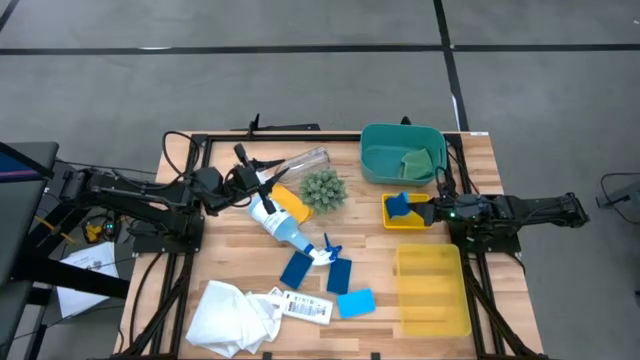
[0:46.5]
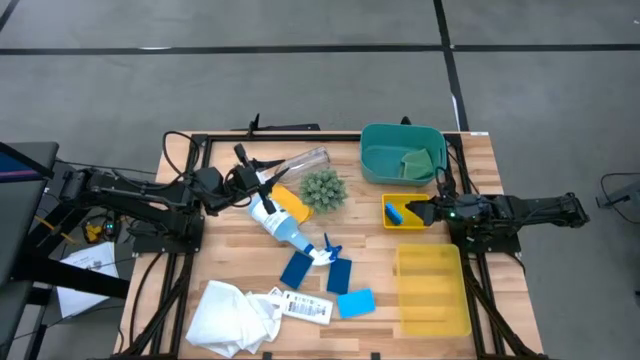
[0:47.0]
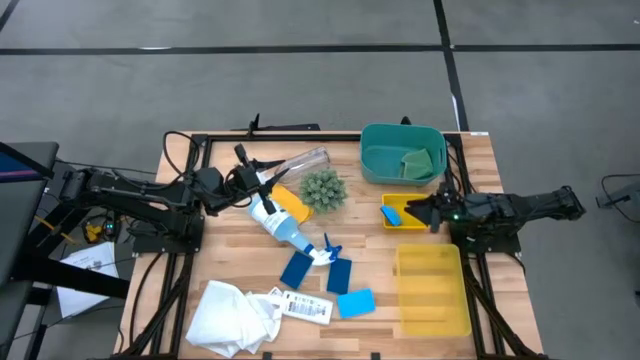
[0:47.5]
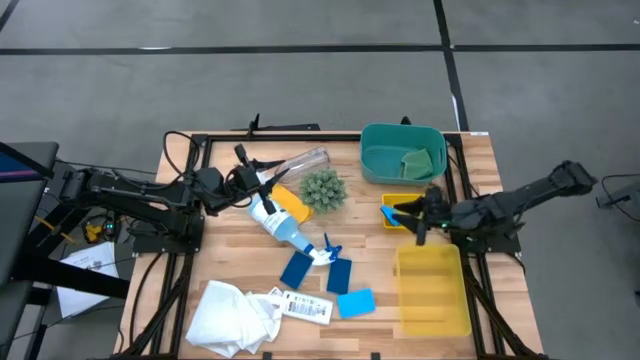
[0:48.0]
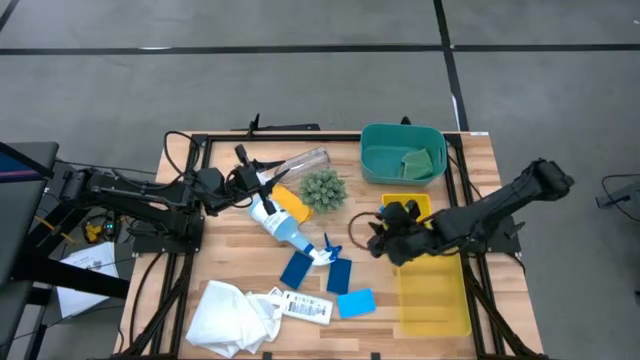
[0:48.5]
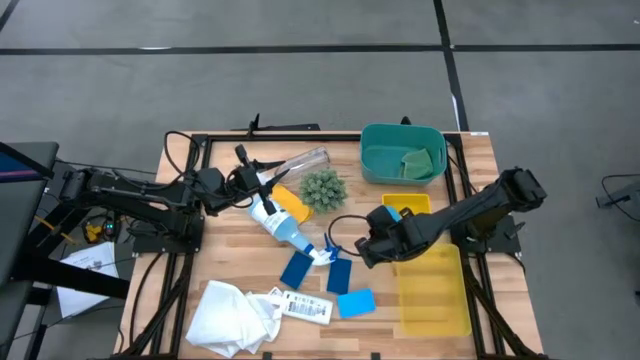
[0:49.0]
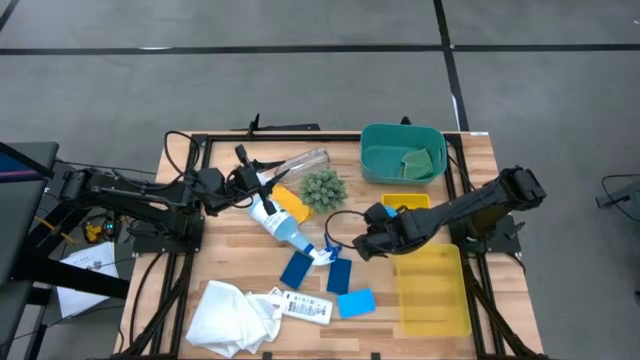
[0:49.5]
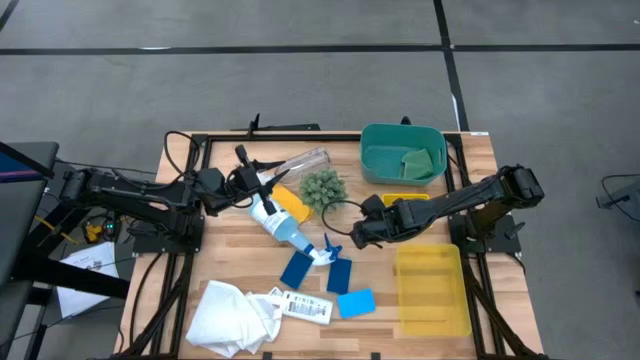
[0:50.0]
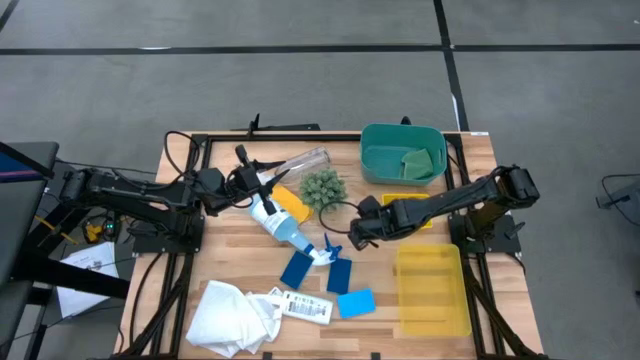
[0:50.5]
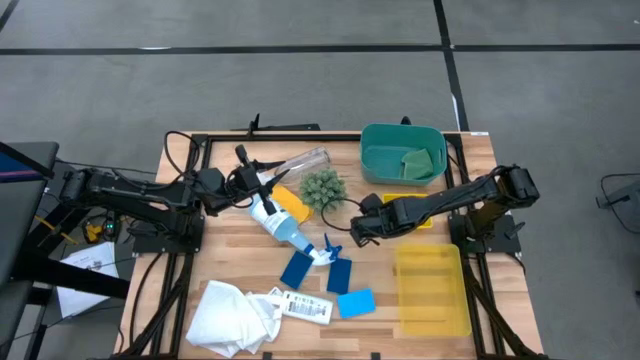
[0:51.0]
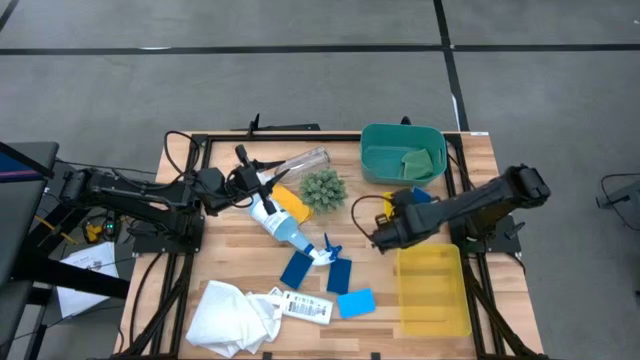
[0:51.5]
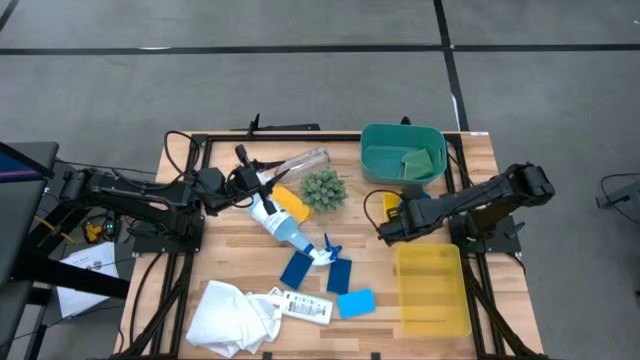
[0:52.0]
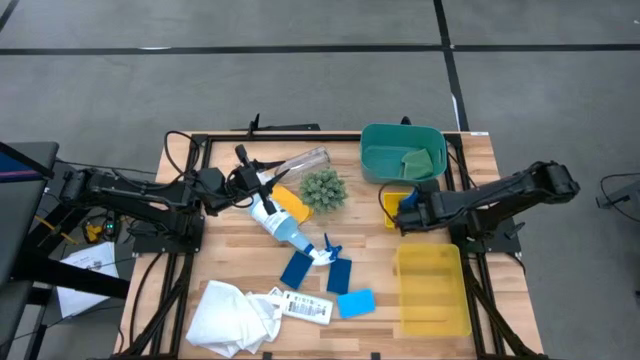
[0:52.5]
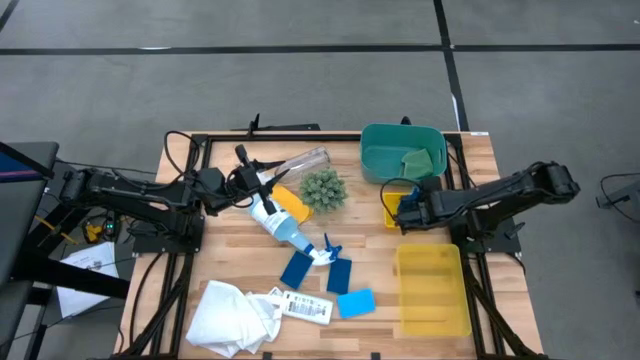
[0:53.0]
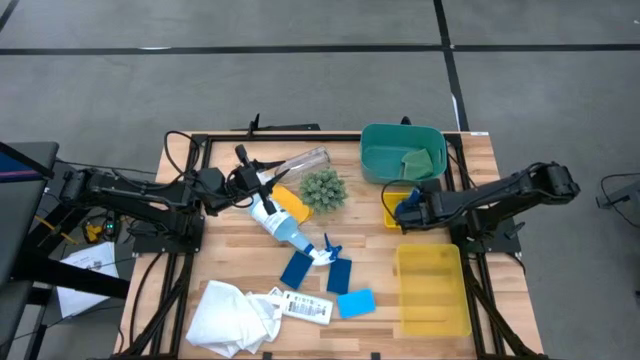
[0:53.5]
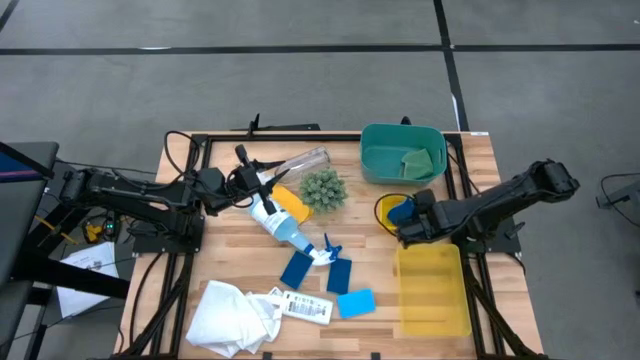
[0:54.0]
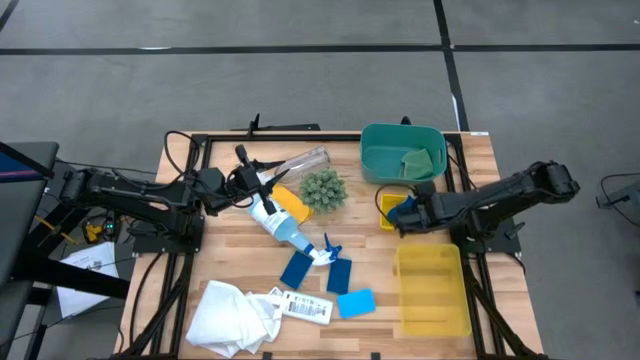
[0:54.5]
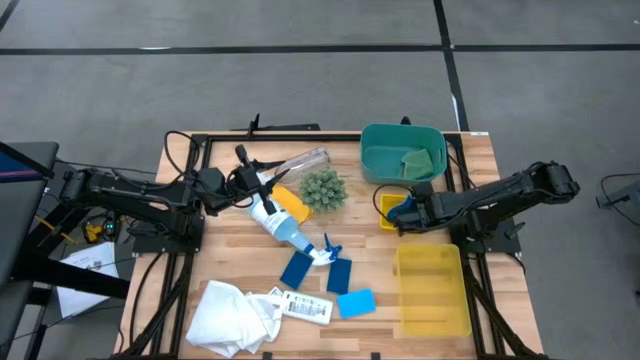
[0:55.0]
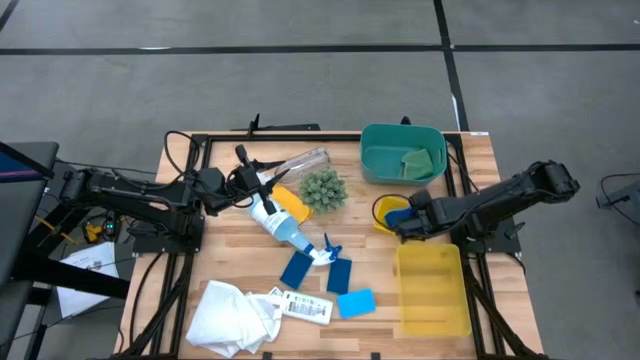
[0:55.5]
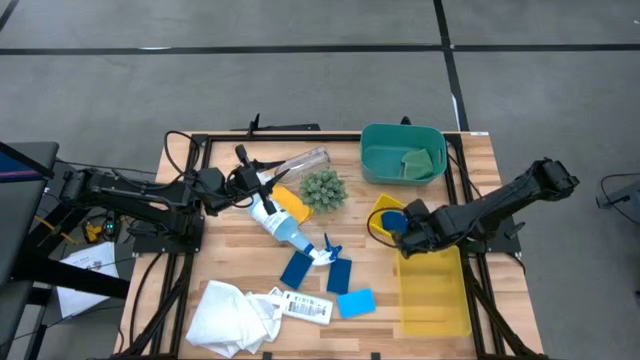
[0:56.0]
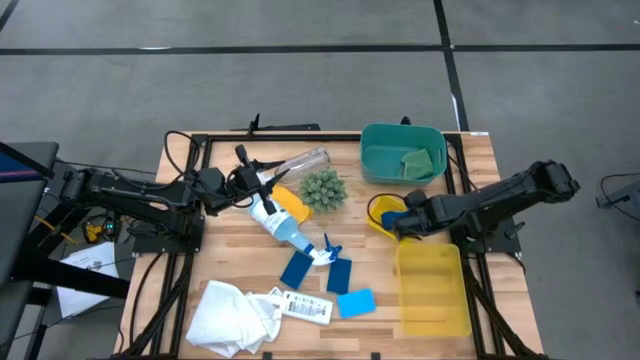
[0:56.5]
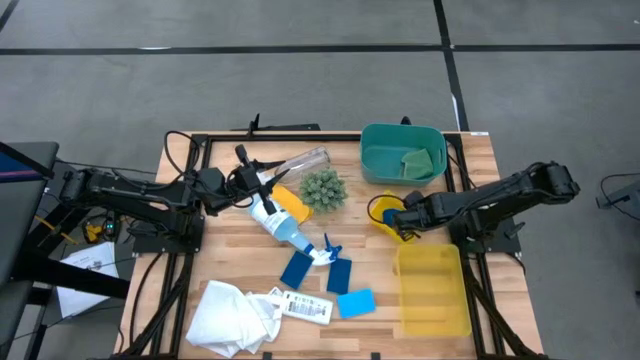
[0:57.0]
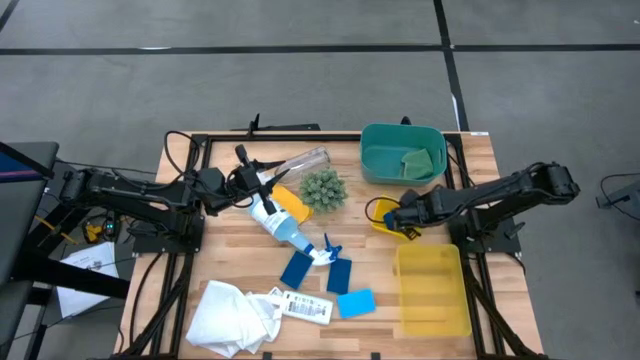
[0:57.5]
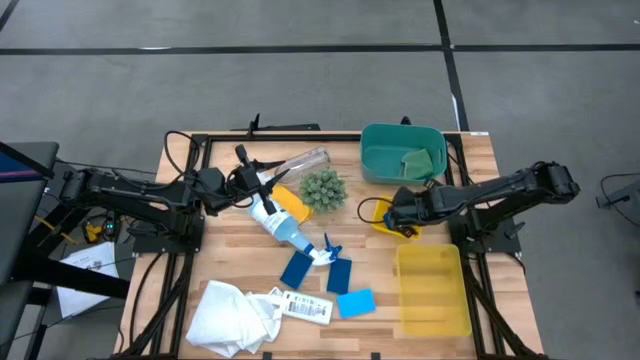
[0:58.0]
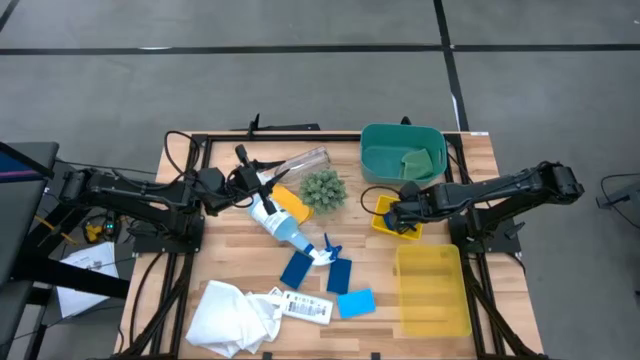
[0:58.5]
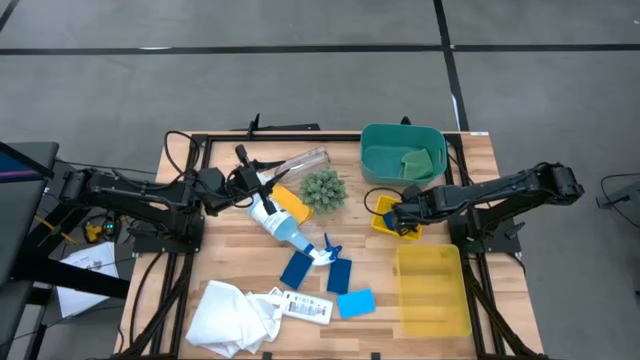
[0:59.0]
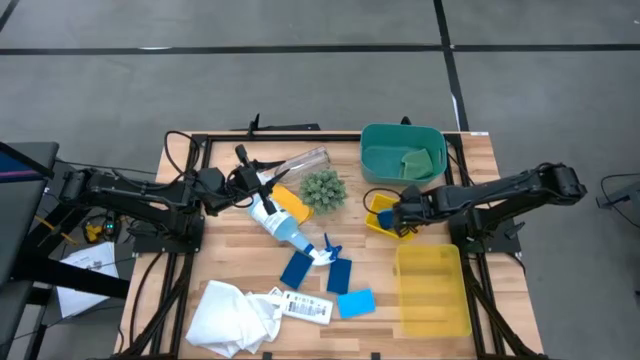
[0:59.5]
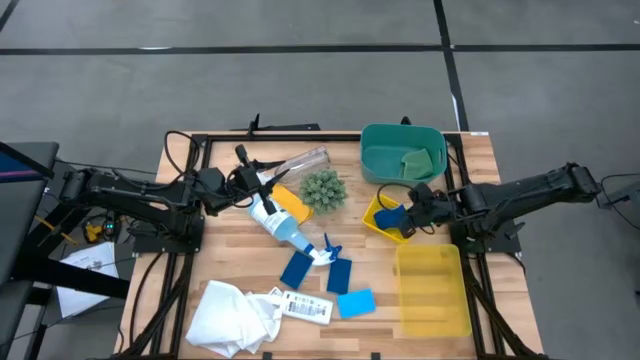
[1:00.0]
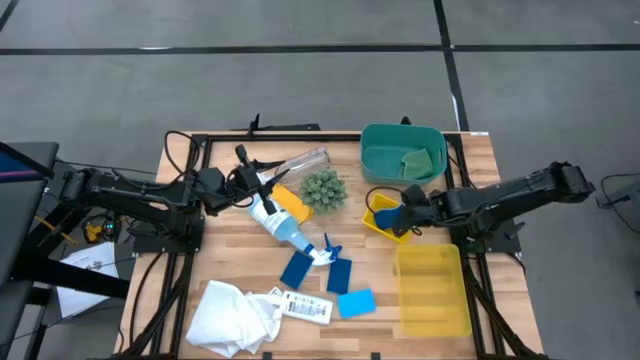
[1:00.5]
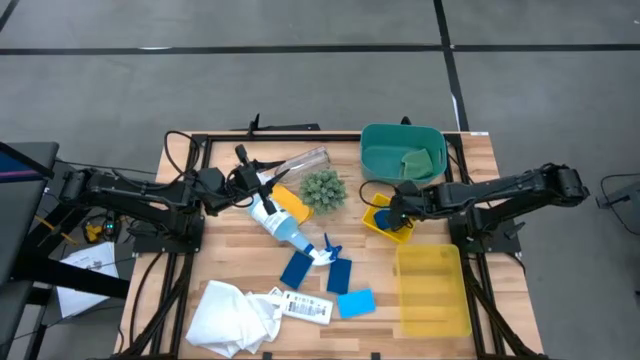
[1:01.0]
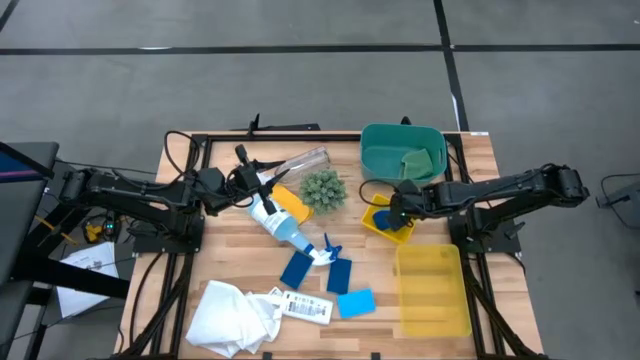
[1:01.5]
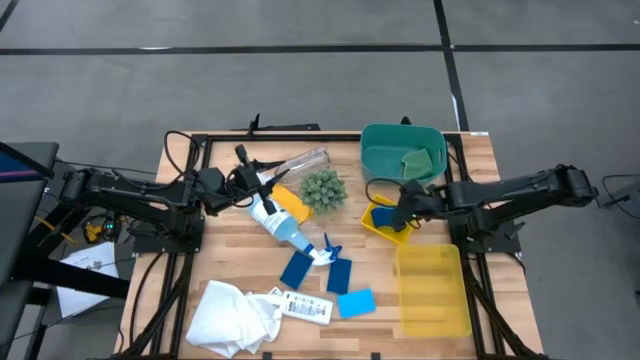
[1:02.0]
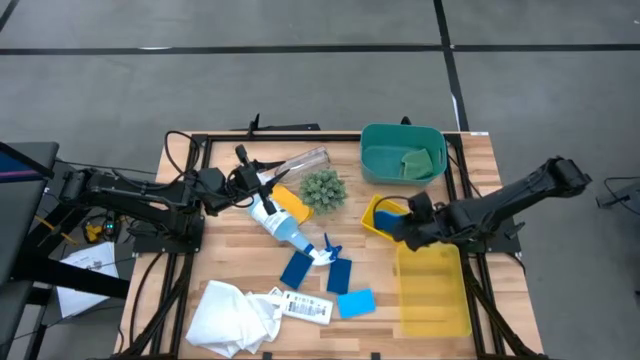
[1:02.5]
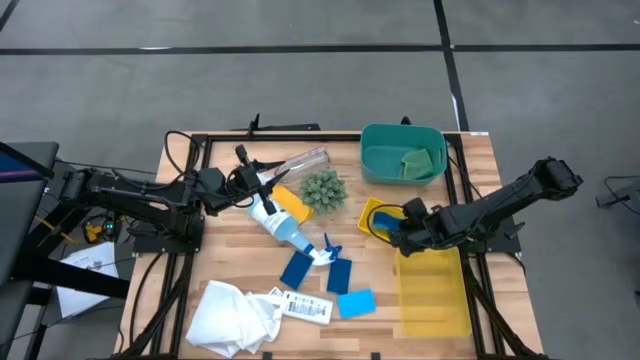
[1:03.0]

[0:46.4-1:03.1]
Task: Pick & Place Kitchen Items
Put the blue sponge into the top yellow bin

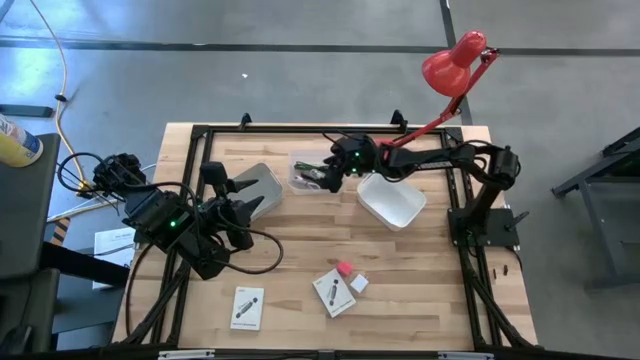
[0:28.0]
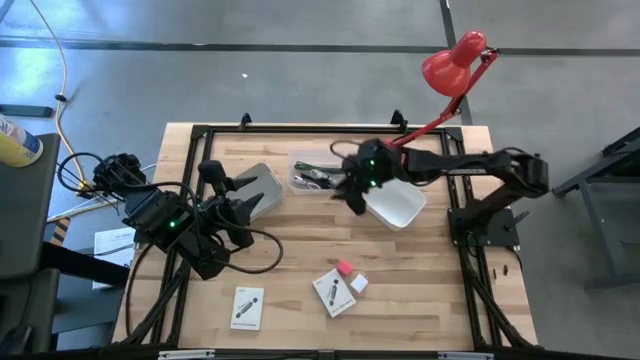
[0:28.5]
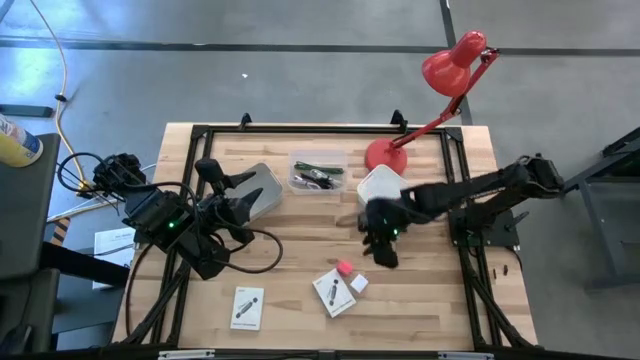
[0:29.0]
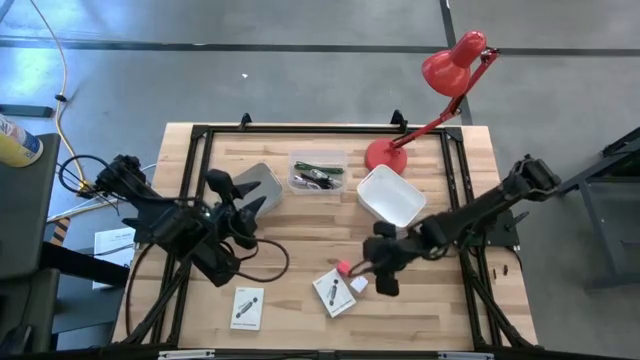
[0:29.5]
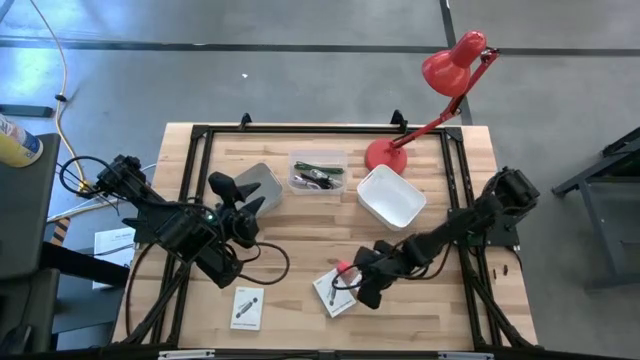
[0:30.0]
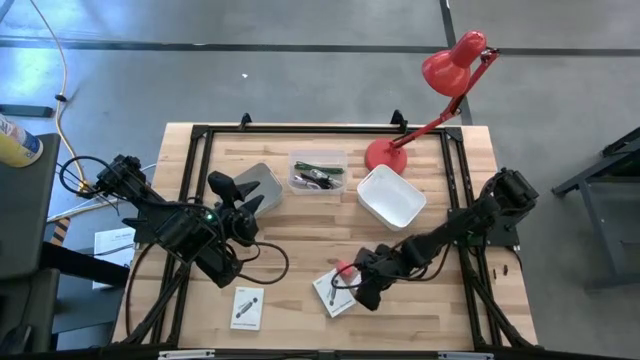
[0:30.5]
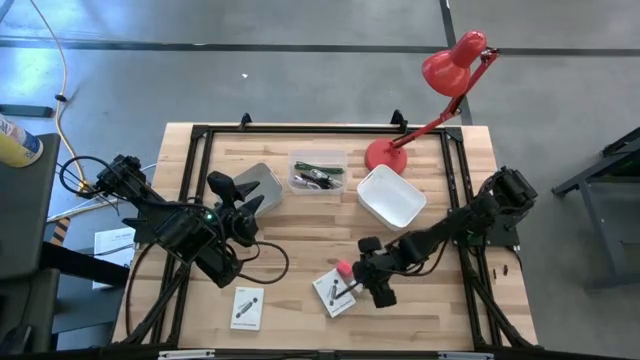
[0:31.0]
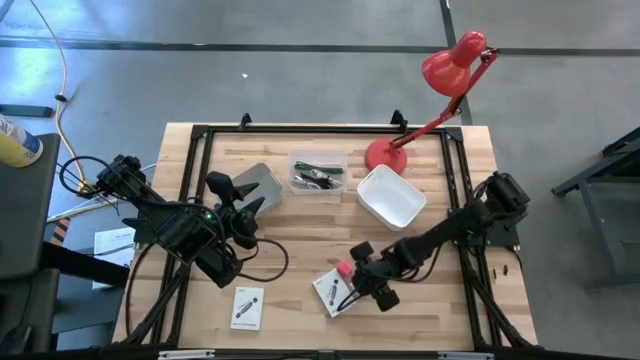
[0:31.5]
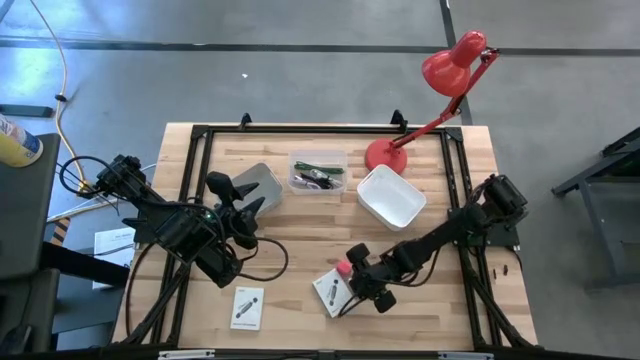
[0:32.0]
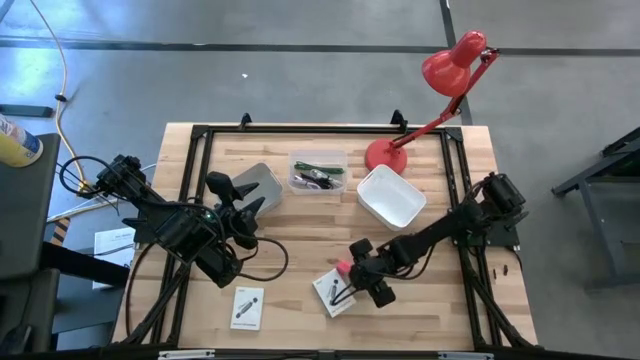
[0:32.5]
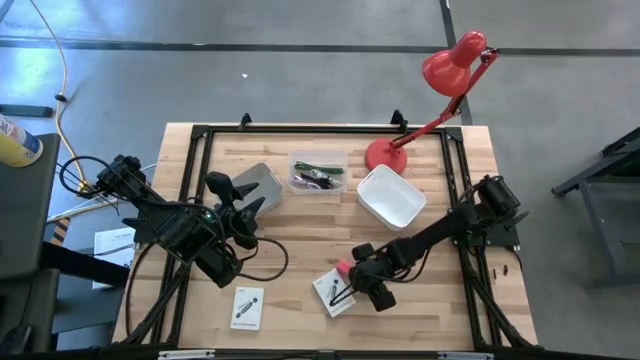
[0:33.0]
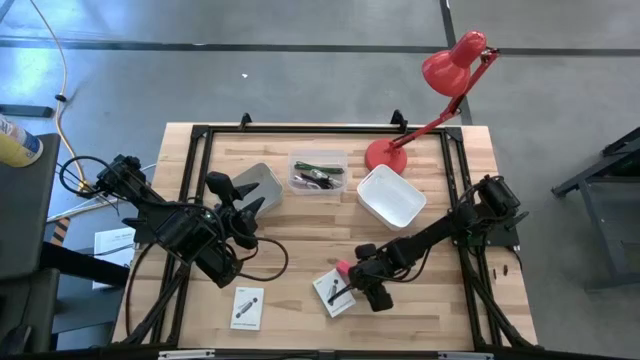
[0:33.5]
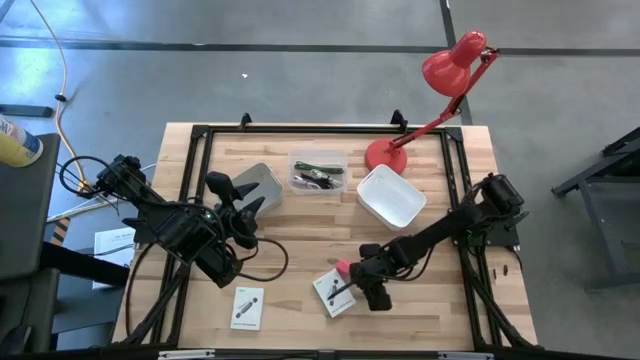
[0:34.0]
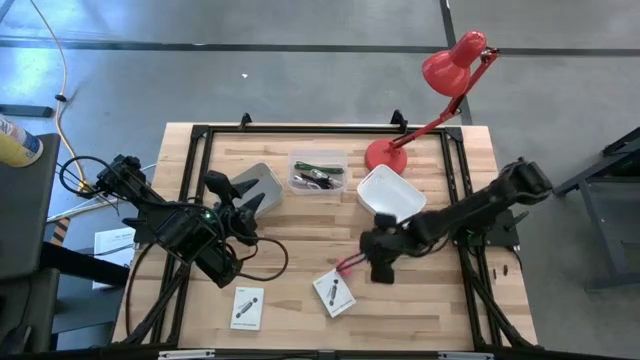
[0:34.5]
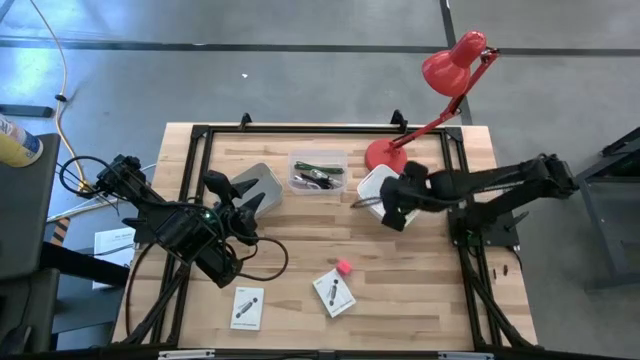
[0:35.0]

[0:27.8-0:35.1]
Task: Pick and place items into bin
Put the white charger adapter into the white bin
